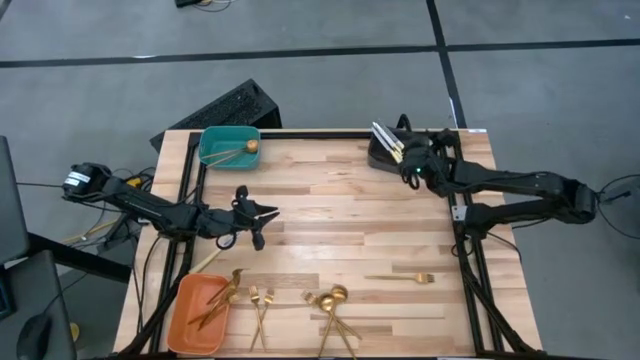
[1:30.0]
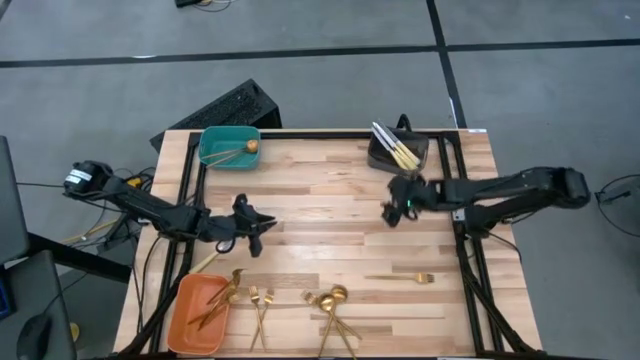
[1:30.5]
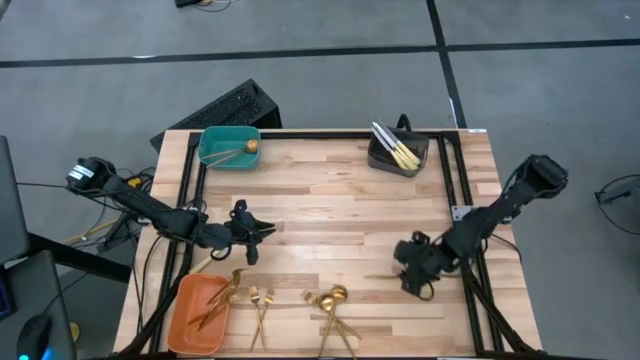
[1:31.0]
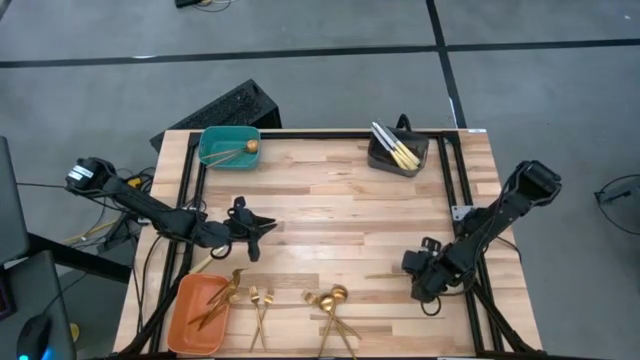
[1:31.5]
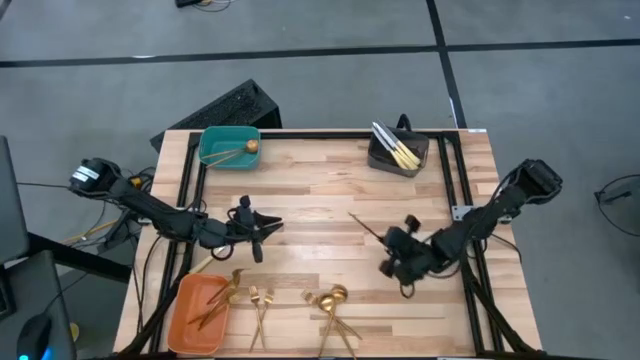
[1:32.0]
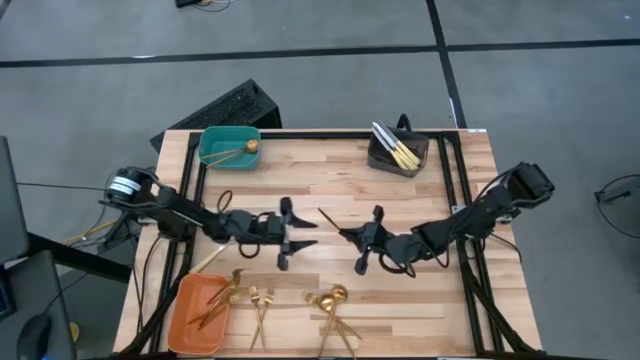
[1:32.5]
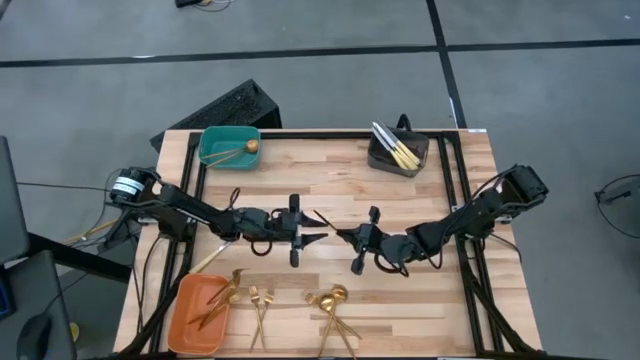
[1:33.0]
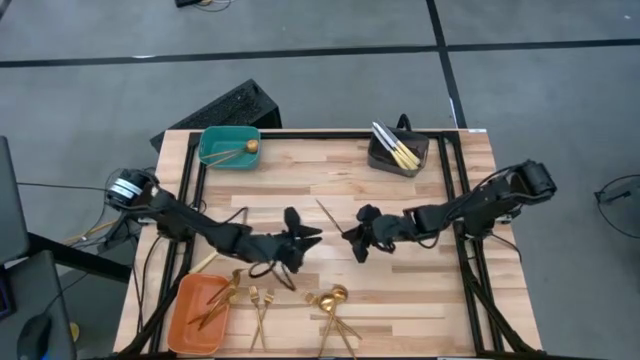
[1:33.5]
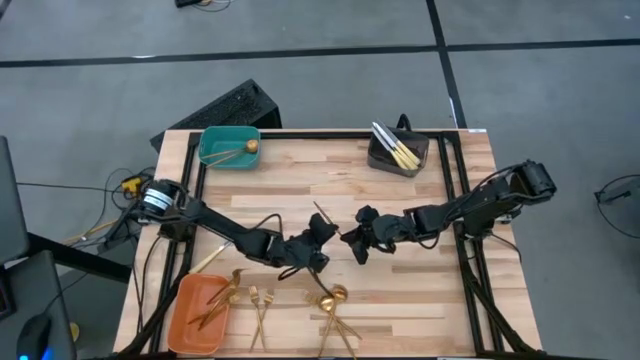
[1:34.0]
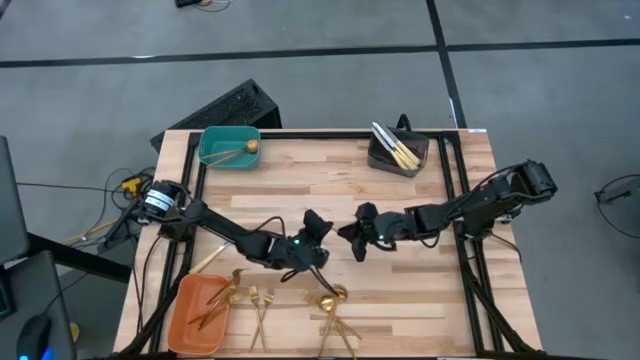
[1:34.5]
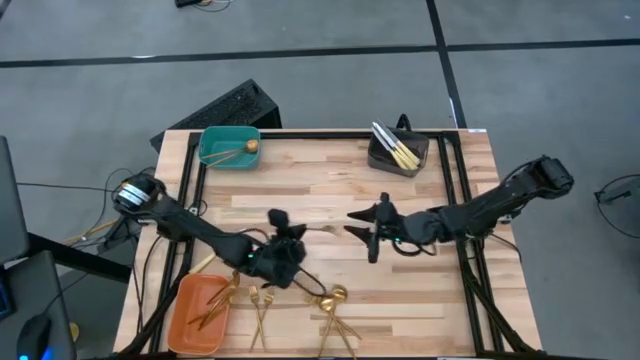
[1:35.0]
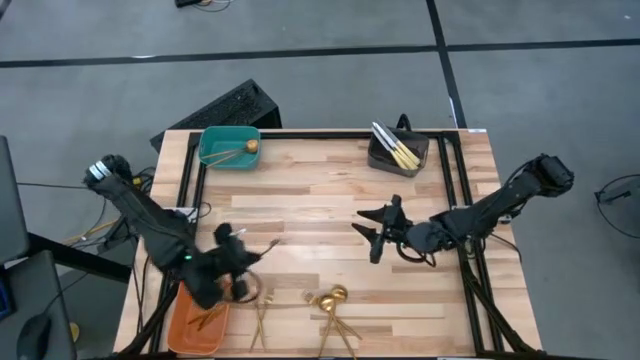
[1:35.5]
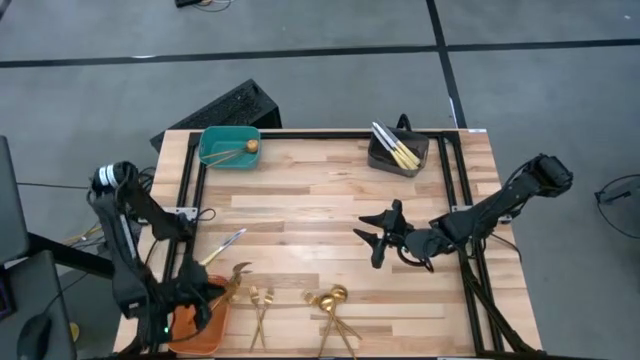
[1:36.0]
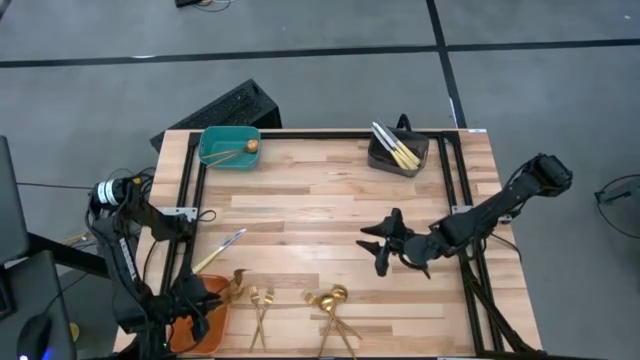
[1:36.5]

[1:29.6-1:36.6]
Task: Sort silverware by color (type)
Put the fork into the orange bin

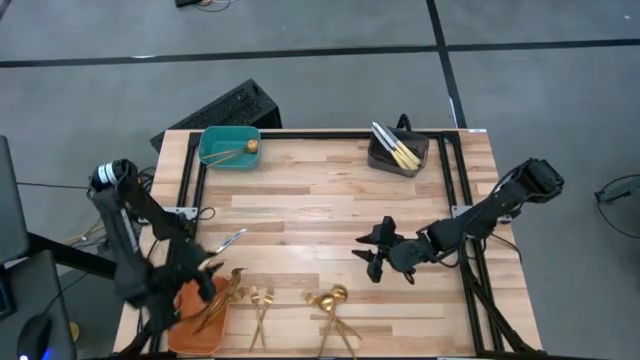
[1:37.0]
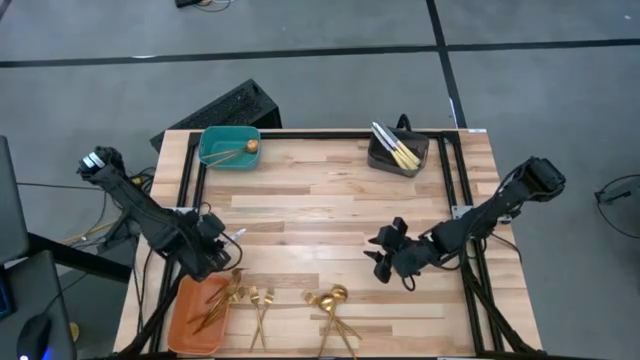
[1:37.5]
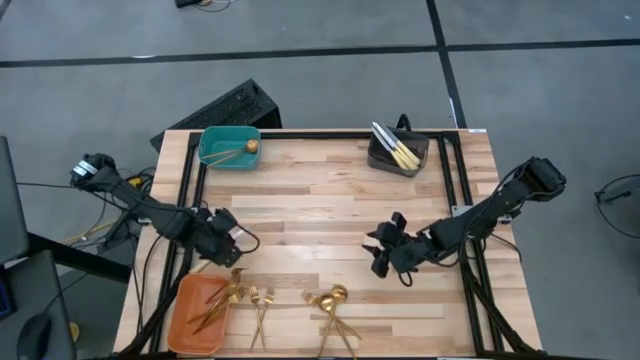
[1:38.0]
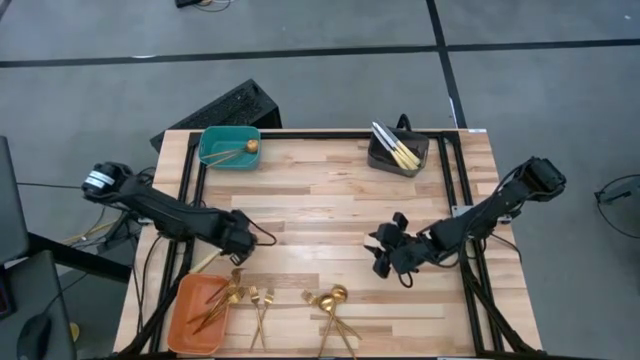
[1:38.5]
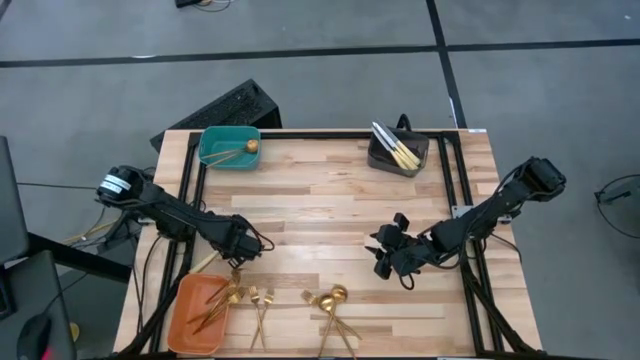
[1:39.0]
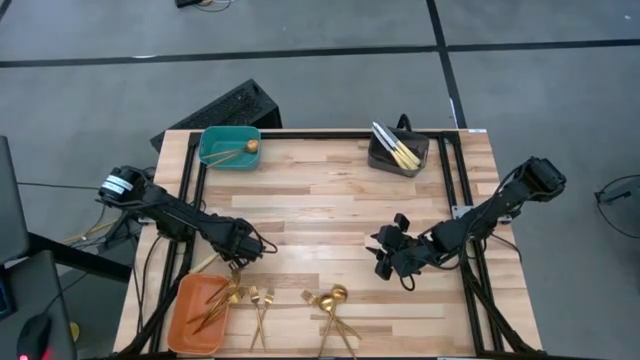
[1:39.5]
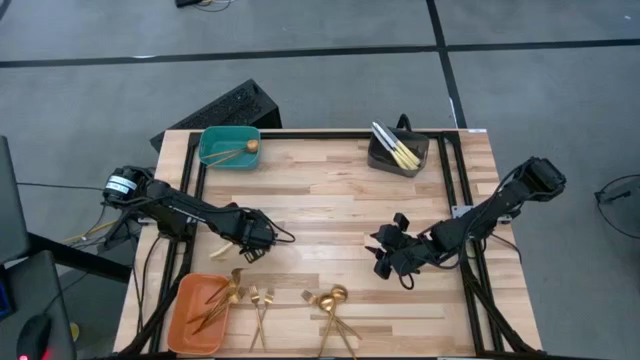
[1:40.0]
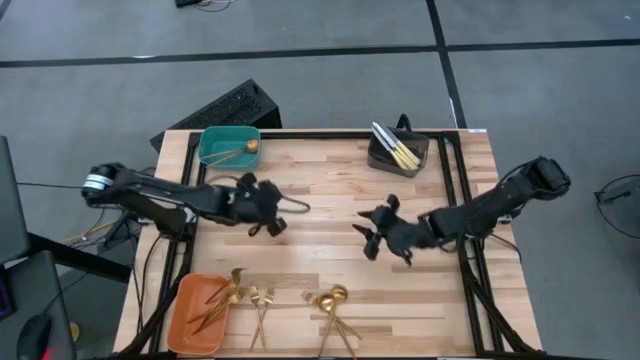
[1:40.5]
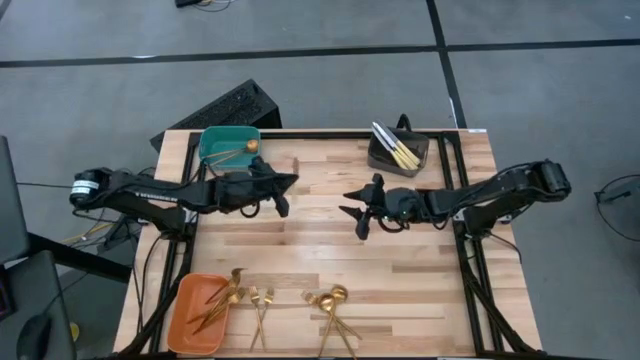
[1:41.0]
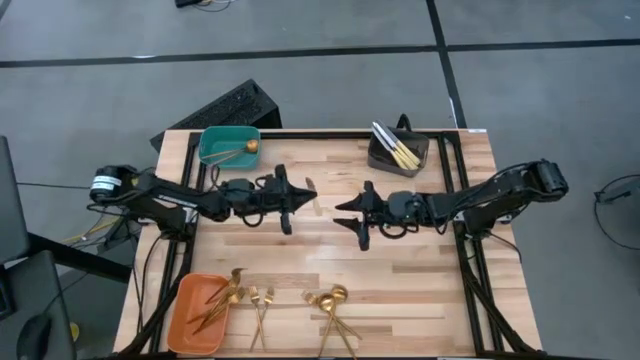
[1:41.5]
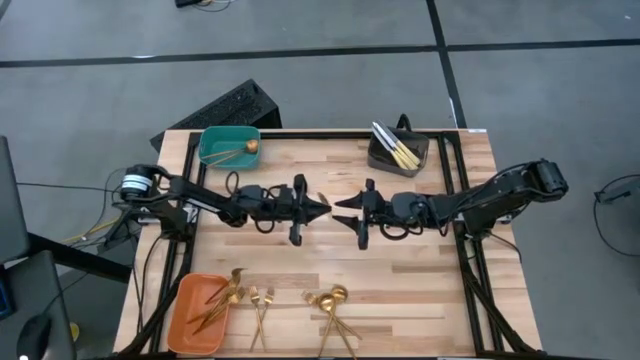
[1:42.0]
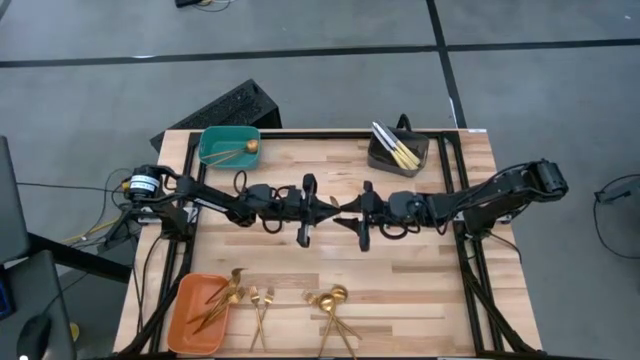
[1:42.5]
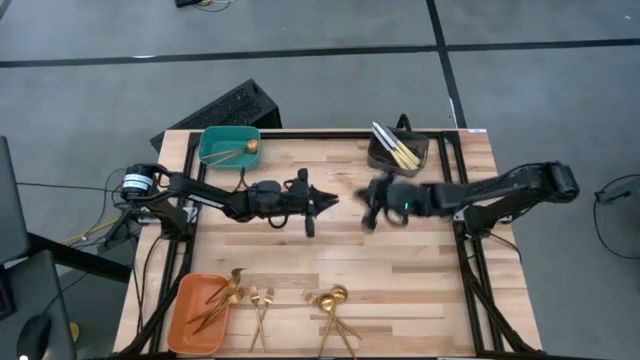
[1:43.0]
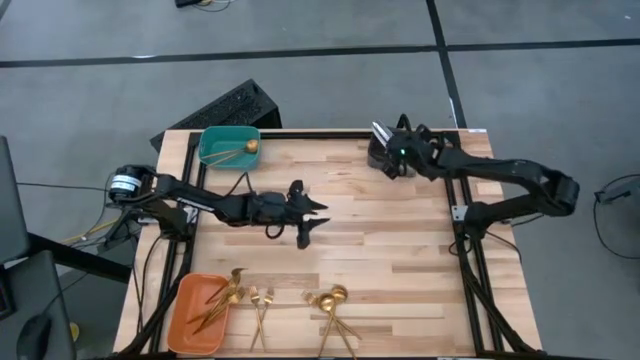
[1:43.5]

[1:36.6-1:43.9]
Put the knife into the black bin

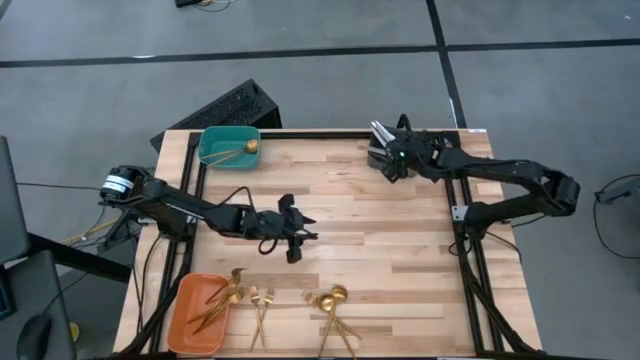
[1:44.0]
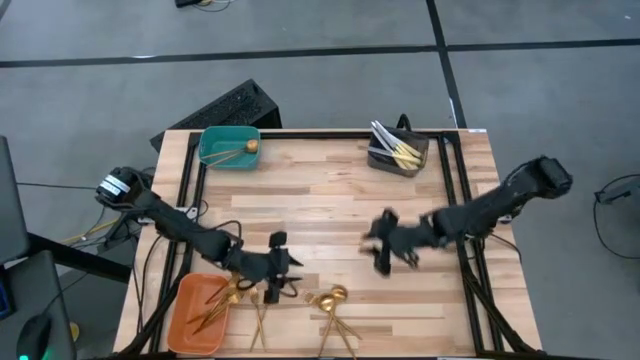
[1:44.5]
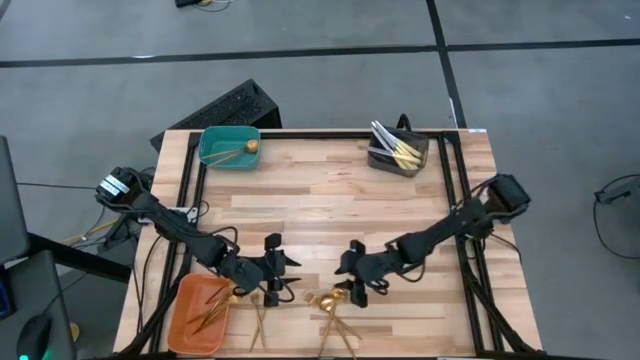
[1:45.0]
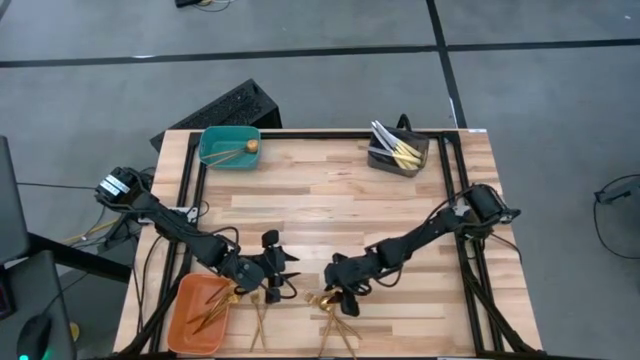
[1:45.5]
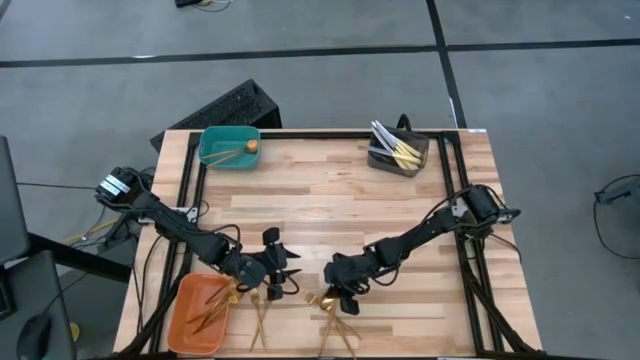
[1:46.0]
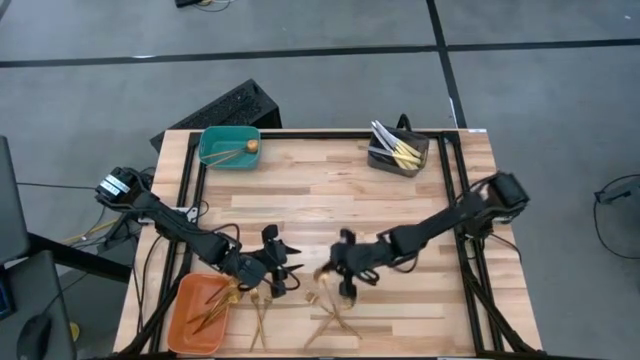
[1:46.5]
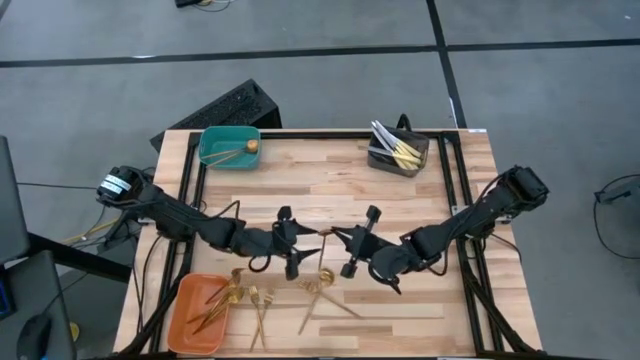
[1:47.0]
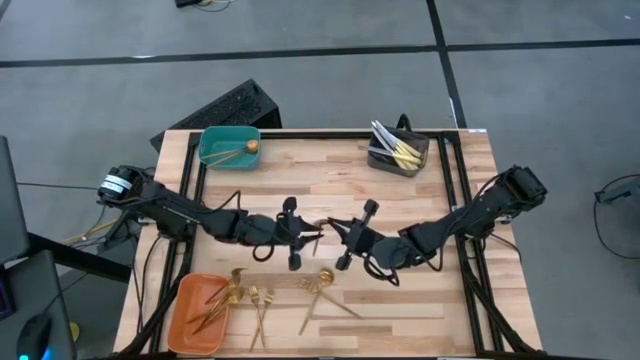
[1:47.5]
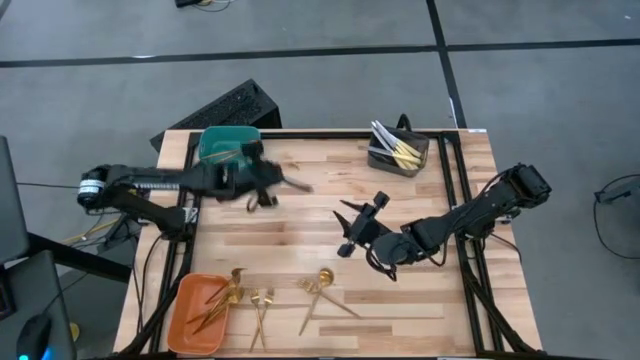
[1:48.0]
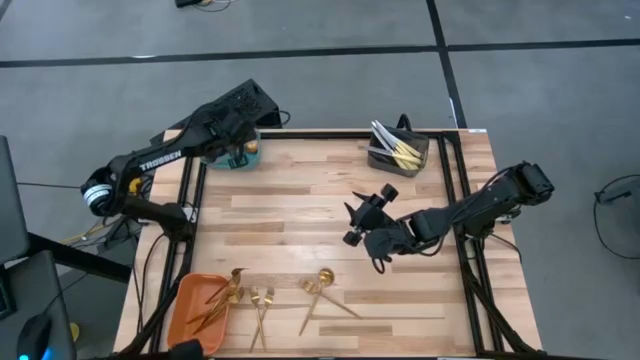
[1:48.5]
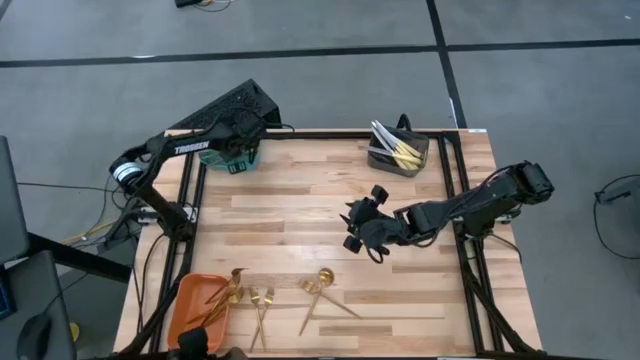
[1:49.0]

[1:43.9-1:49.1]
Put the top spoon into the green bin

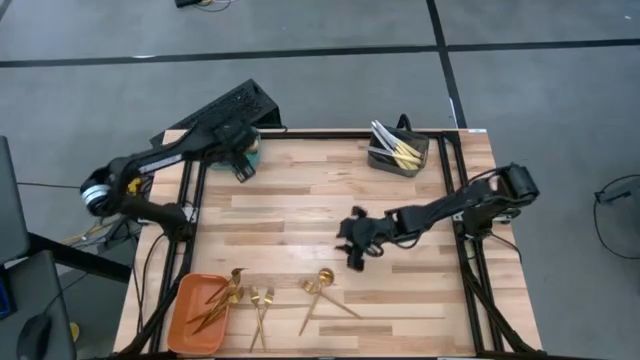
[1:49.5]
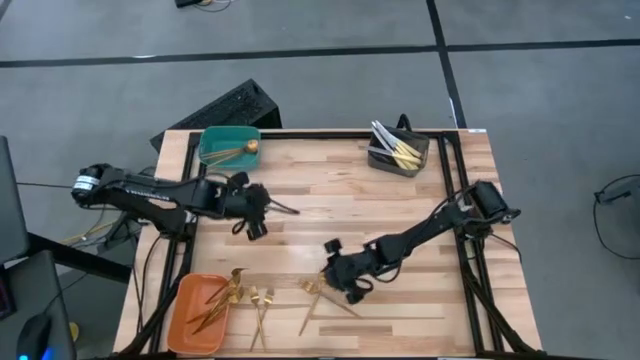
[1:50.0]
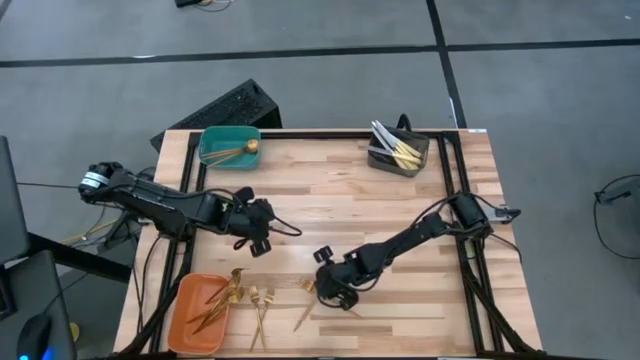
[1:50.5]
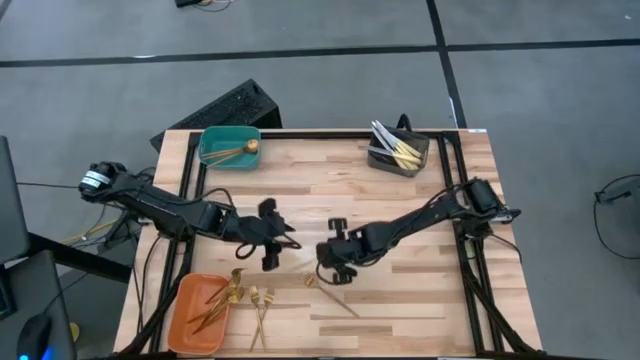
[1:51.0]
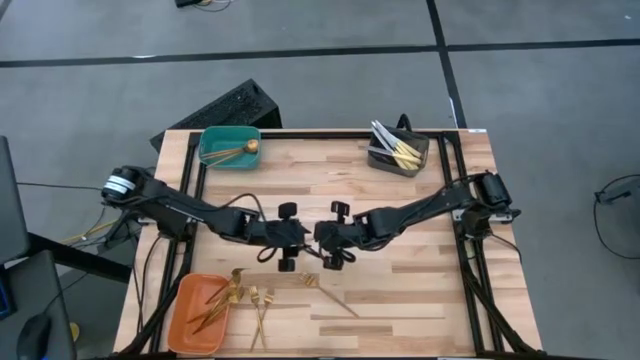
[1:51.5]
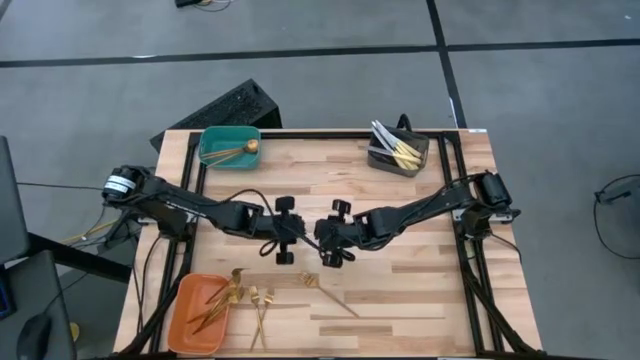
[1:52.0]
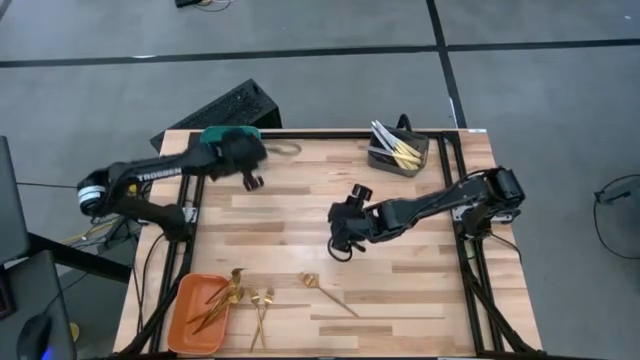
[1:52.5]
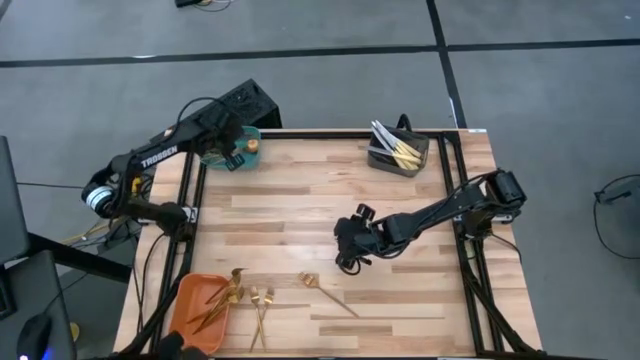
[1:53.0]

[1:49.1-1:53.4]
Put the spoon into the green bin
